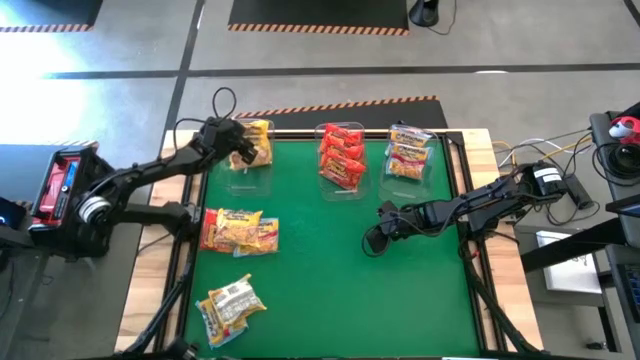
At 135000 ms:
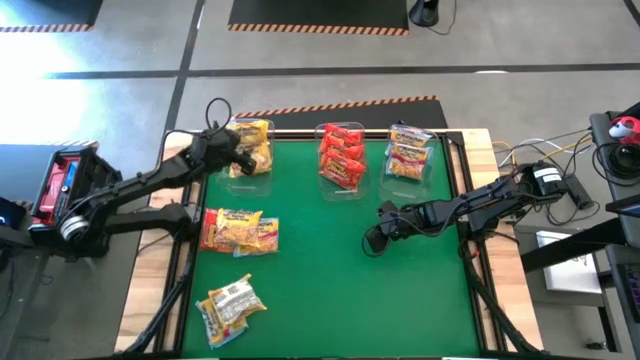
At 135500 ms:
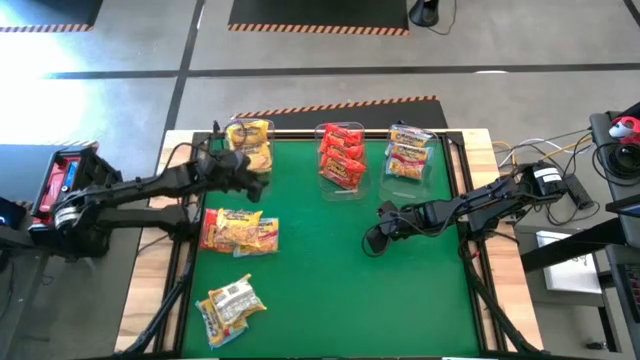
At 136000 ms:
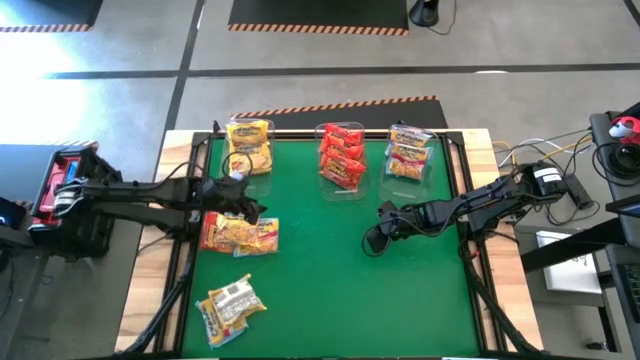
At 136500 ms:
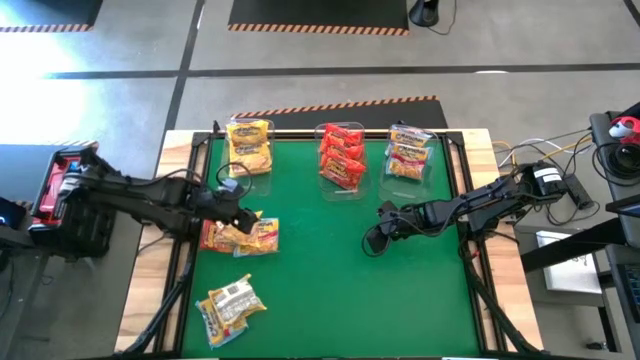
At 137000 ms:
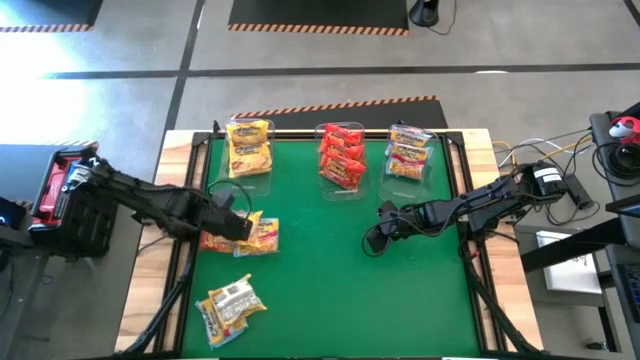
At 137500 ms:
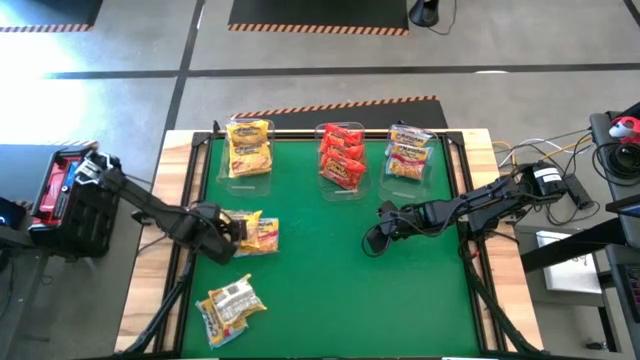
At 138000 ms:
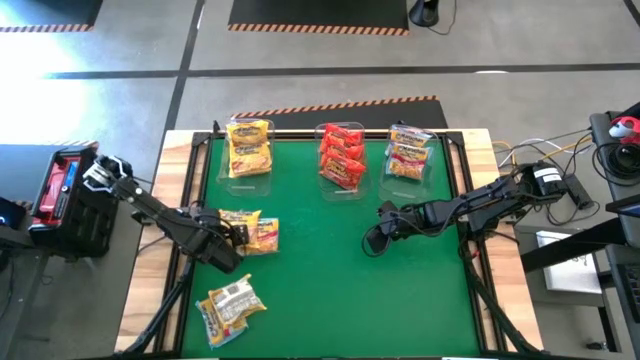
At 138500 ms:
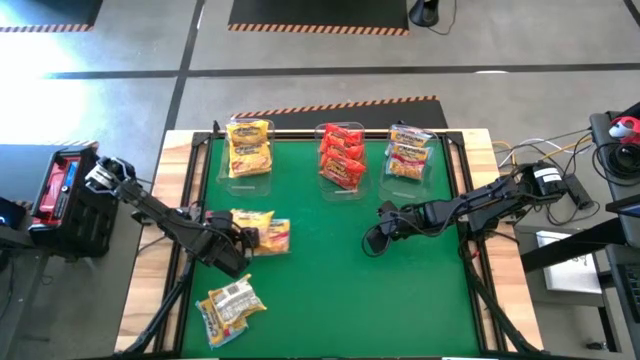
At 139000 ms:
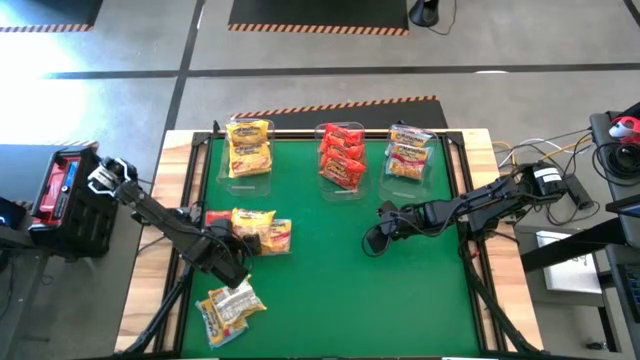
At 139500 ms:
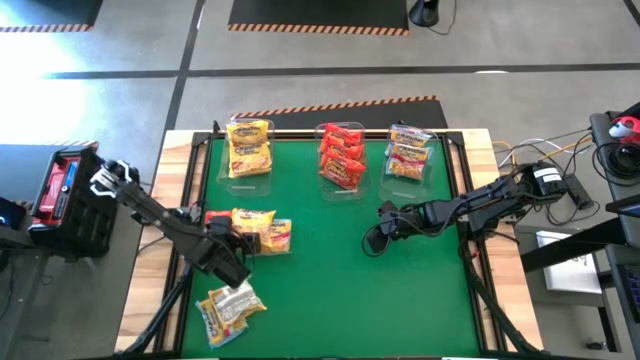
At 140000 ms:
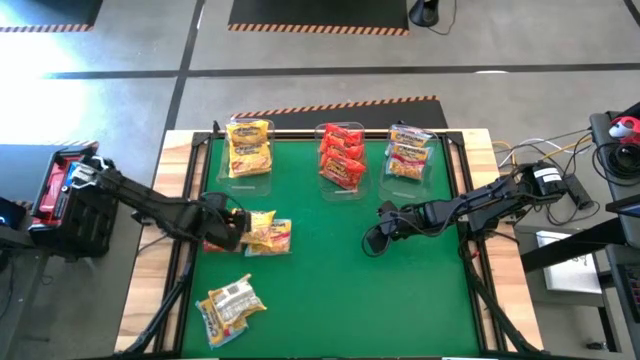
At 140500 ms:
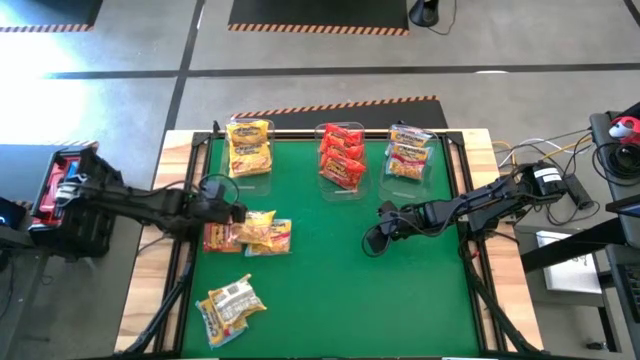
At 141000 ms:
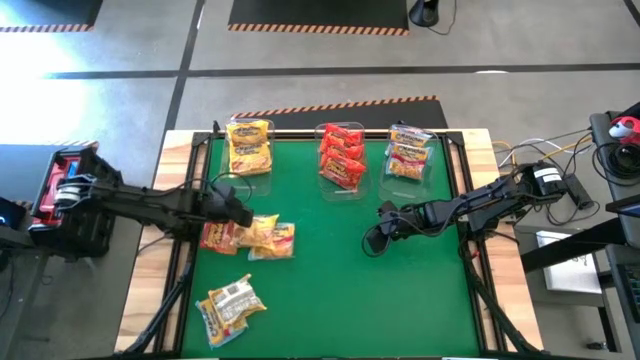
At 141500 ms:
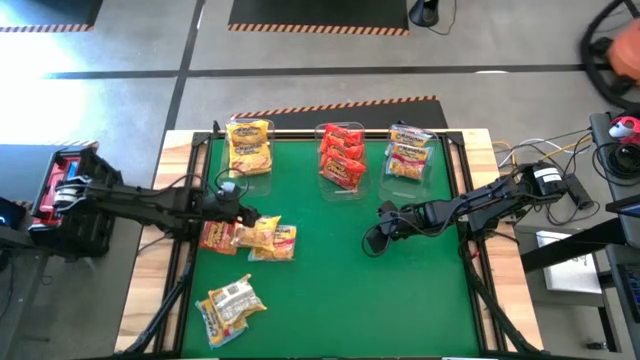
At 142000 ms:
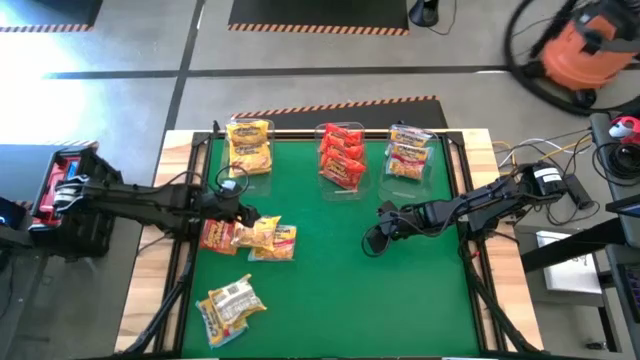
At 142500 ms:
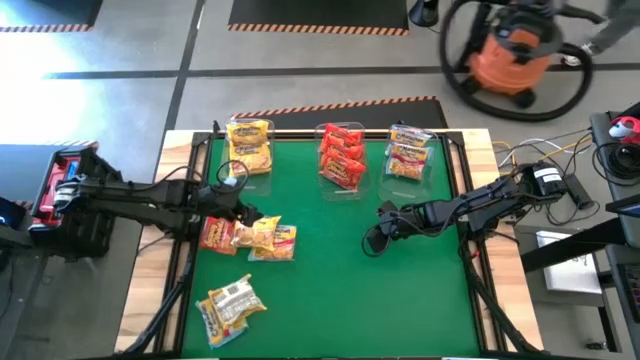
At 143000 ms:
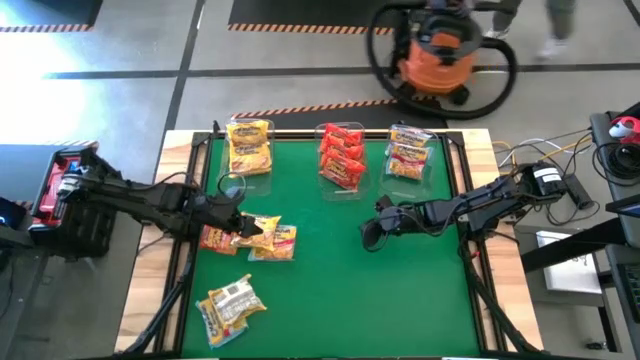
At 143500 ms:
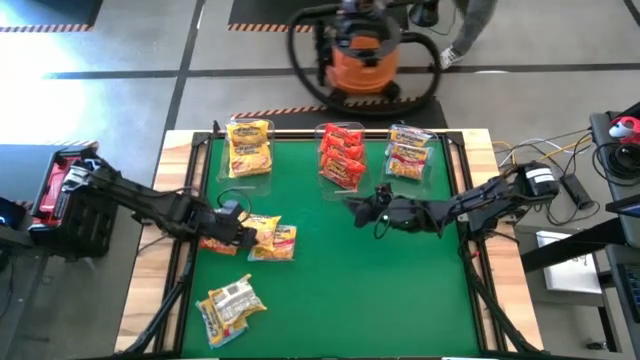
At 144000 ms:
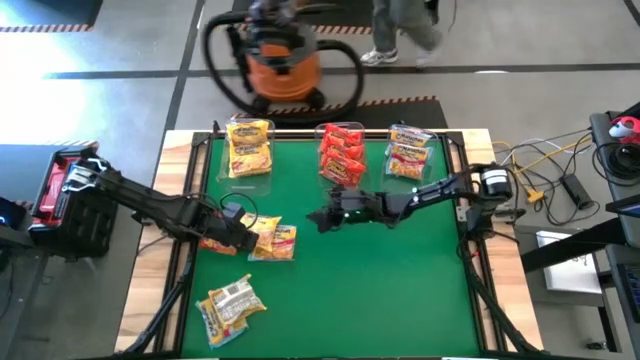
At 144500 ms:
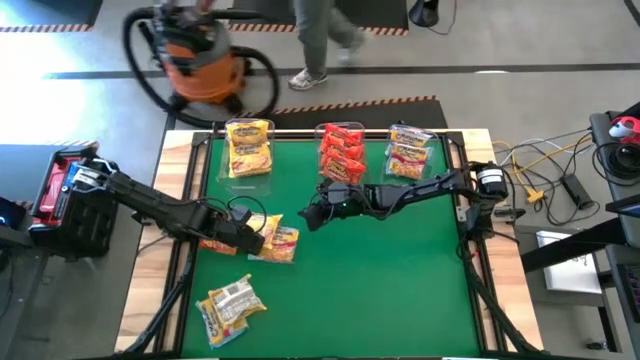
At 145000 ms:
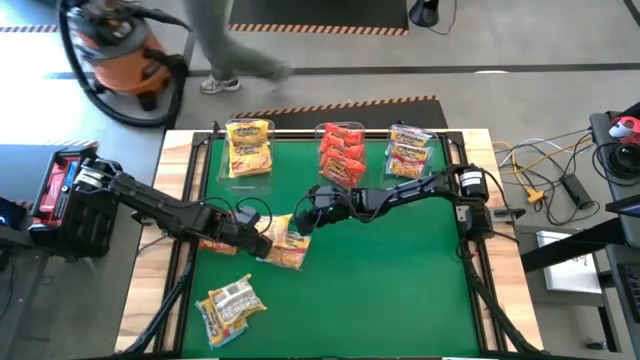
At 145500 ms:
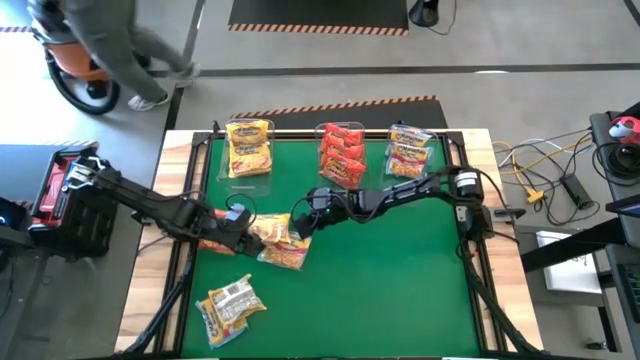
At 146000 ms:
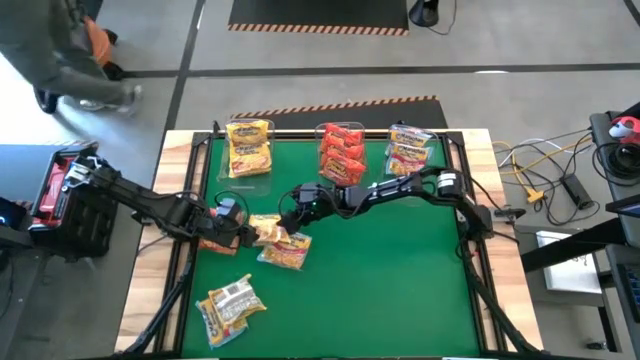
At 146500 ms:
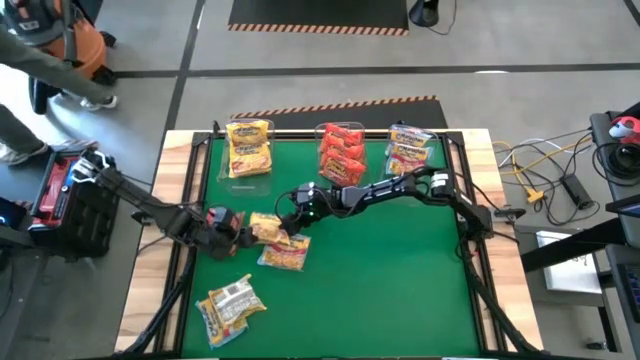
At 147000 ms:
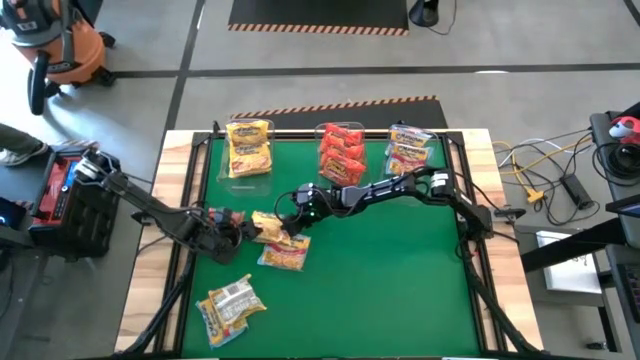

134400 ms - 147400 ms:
Task: Sort Maruchan noodles
Put the yellow noodle pack into the left transparent bin

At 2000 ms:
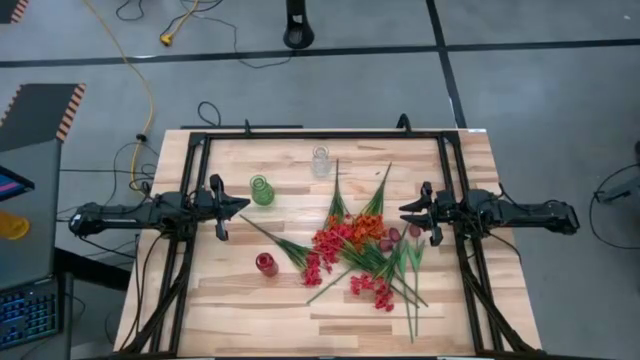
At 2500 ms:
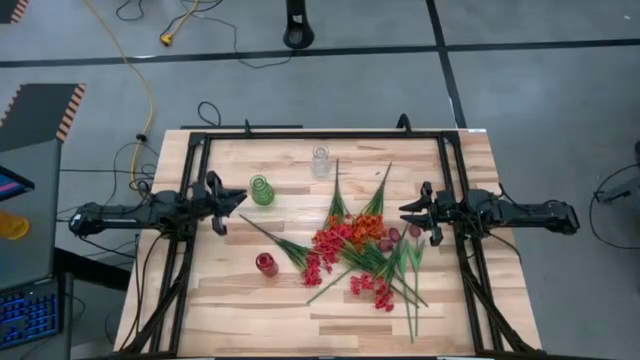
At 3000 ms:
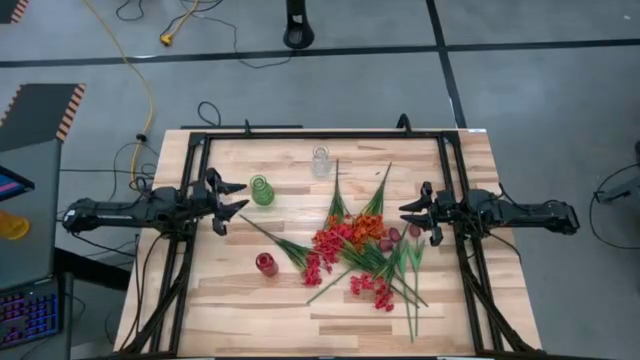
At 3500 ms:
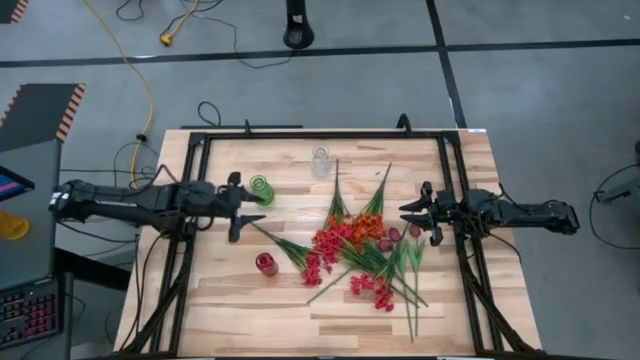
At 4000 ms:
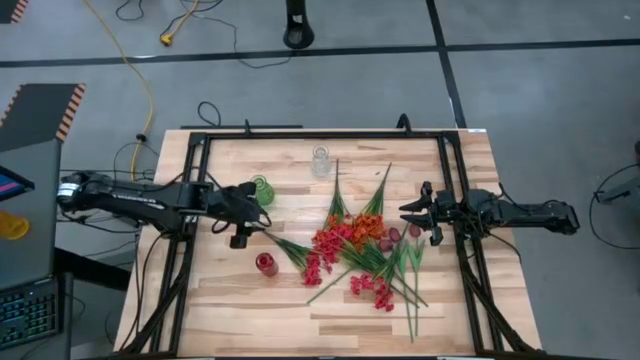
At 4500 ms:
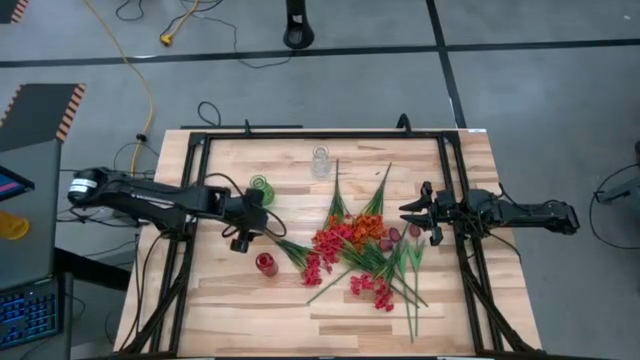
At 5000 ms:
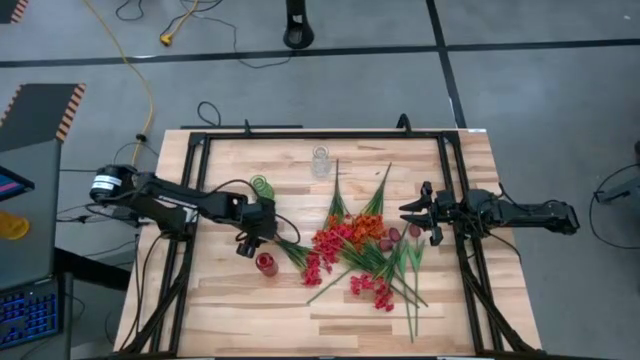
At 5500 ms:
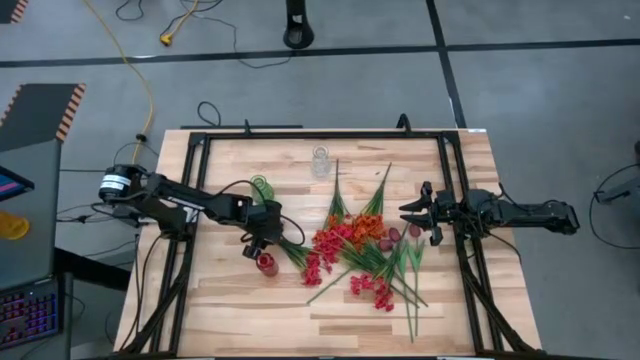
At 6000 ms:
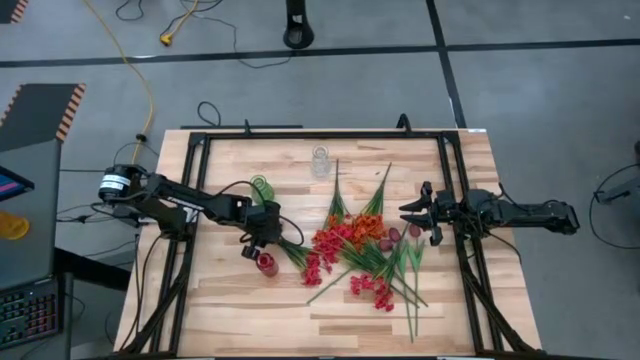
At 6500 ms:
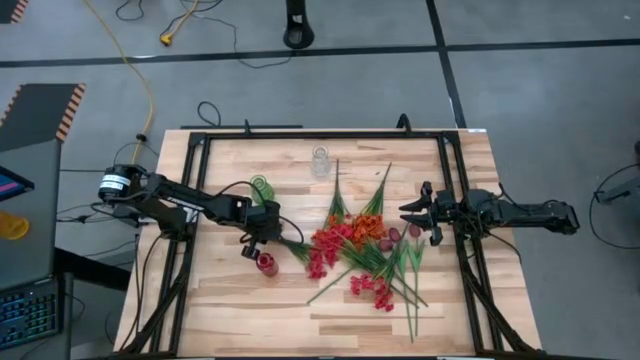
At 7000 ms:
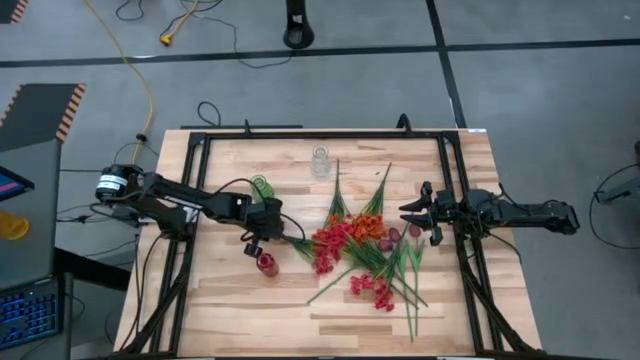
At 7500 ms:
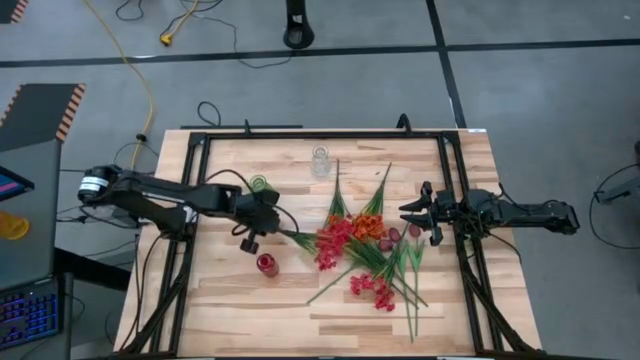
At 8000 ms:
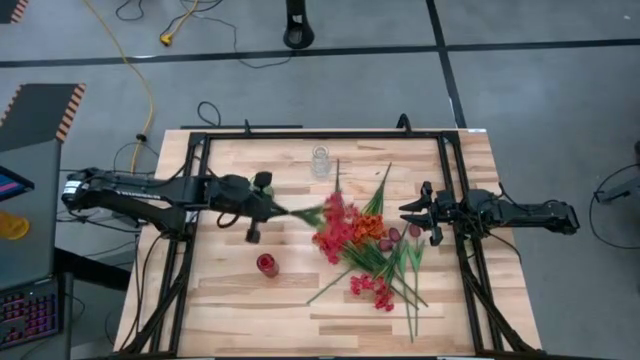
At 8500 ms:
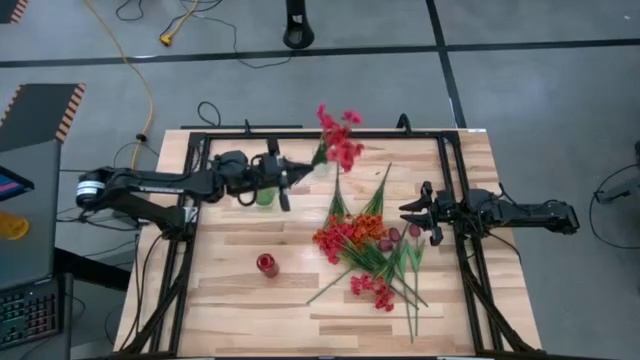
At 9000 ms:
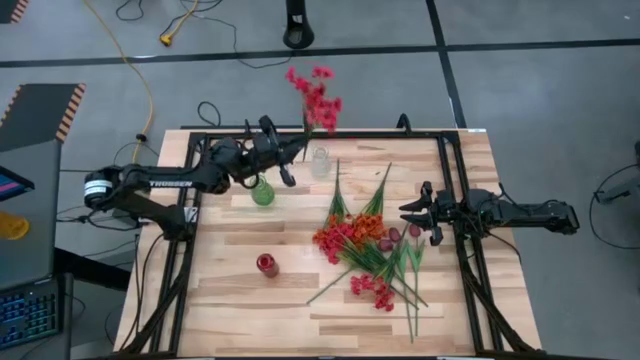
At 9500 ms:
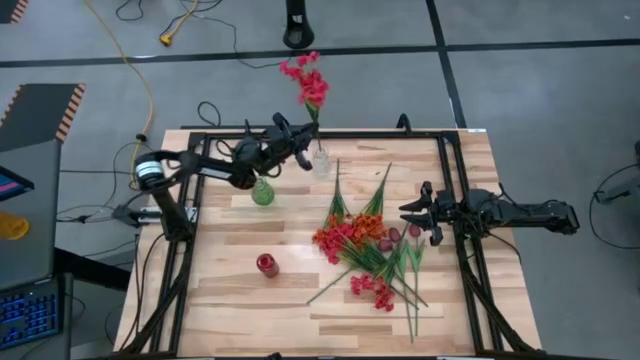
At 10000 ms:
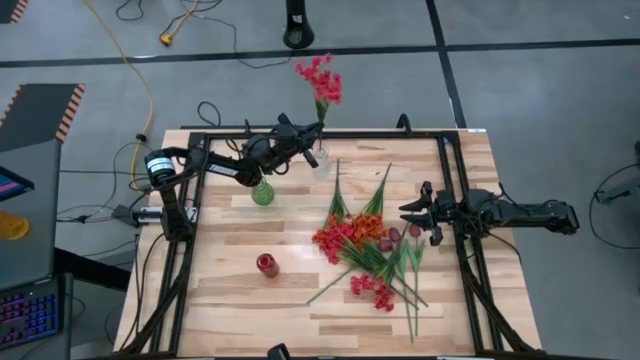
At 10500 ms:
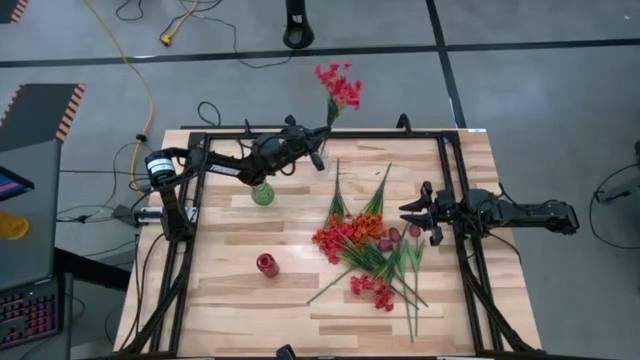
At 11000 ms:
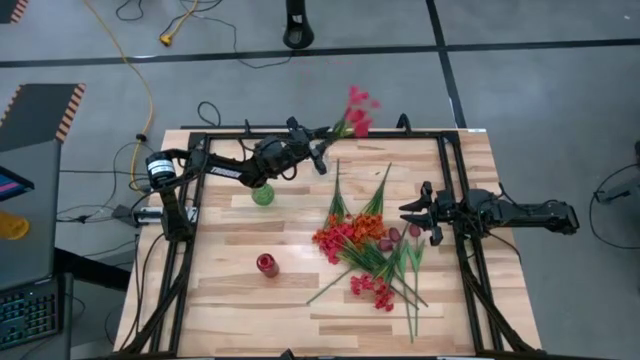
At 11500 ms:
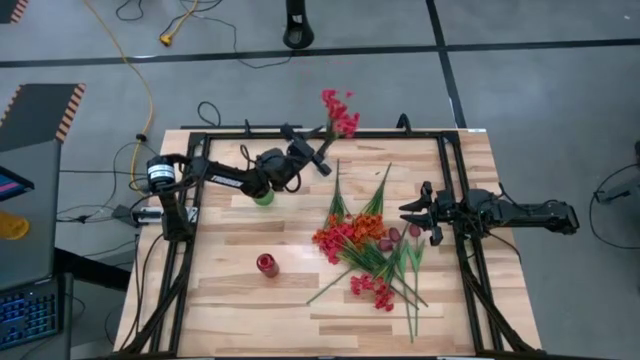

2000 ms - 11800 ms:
Task: Sort flowers into vase by color
Put the left red flower into the vase
